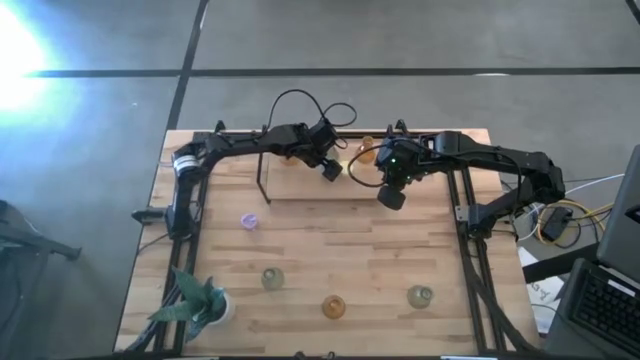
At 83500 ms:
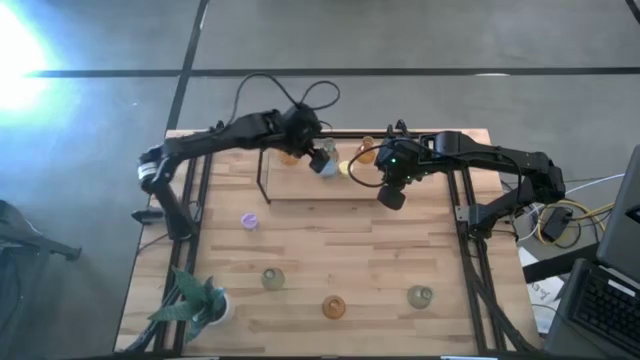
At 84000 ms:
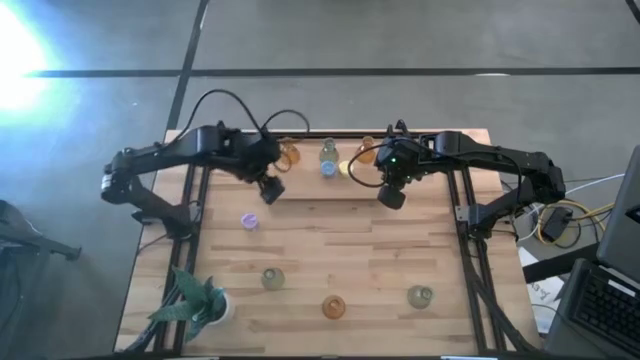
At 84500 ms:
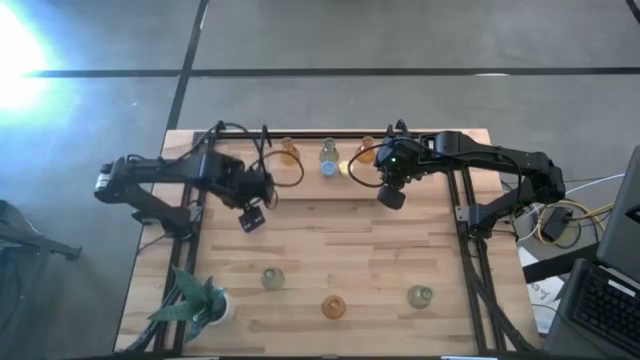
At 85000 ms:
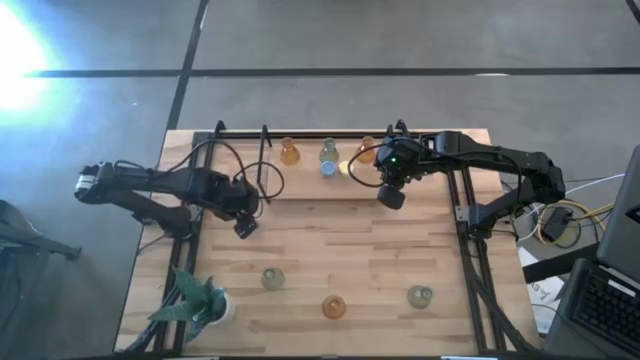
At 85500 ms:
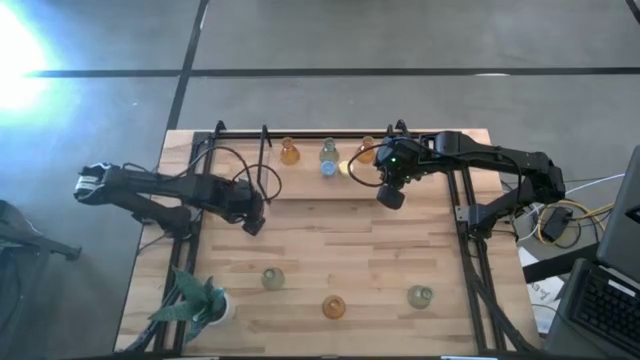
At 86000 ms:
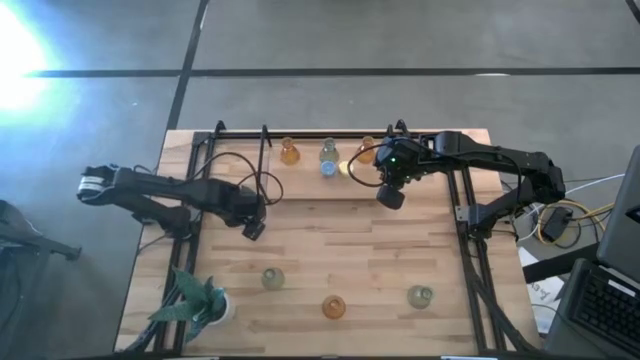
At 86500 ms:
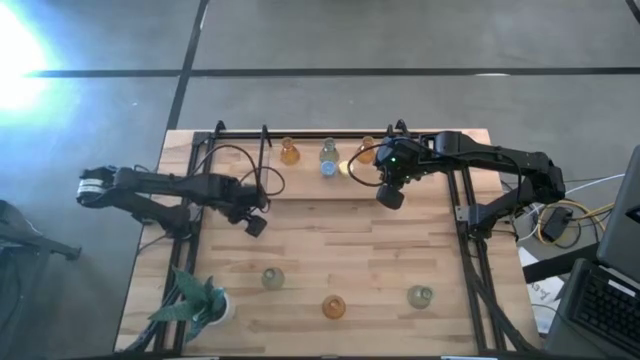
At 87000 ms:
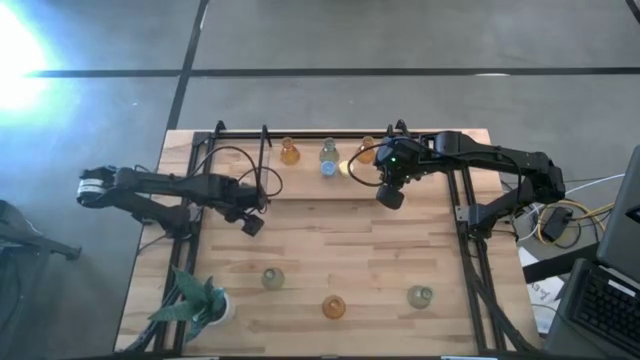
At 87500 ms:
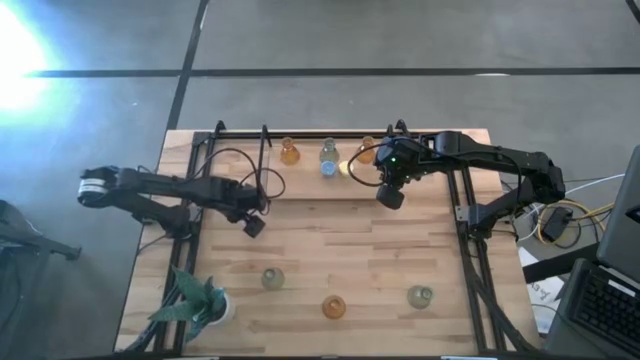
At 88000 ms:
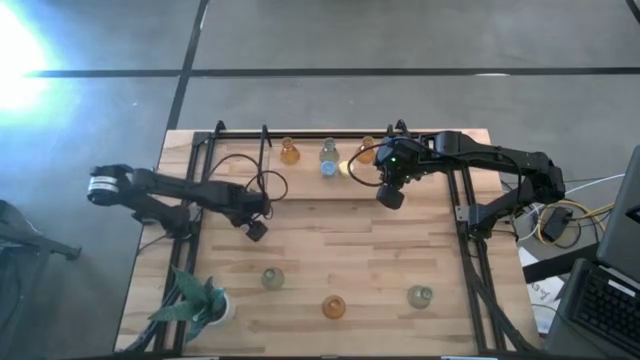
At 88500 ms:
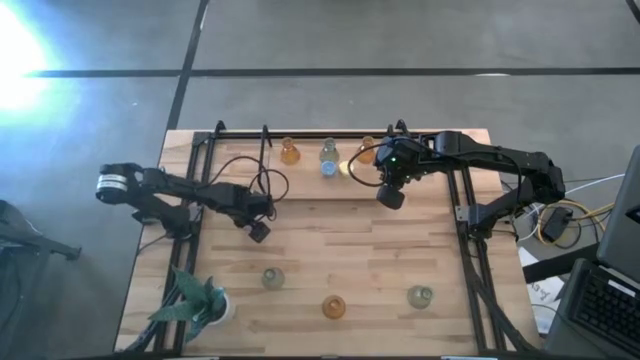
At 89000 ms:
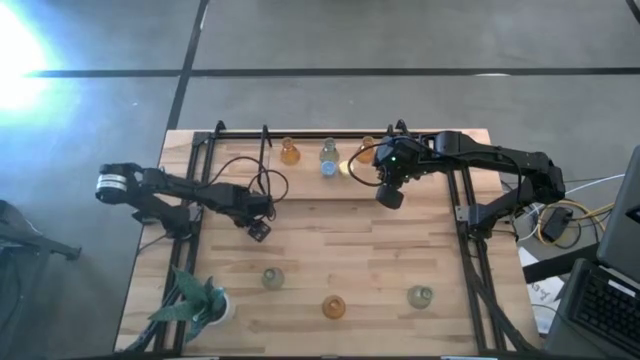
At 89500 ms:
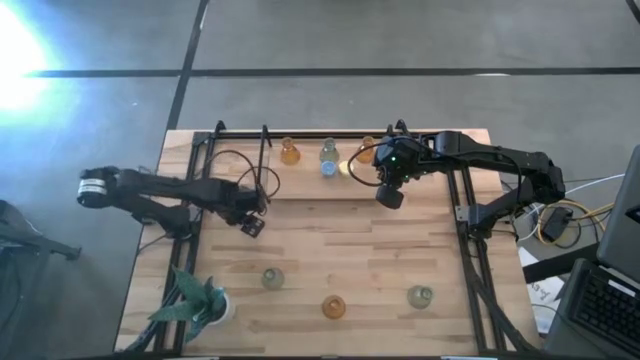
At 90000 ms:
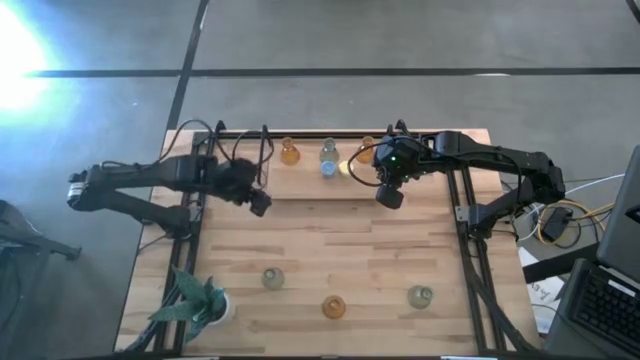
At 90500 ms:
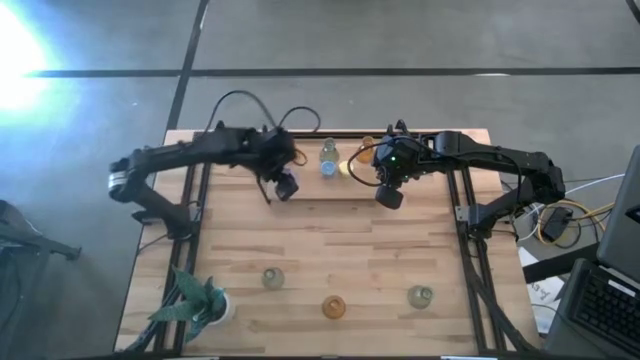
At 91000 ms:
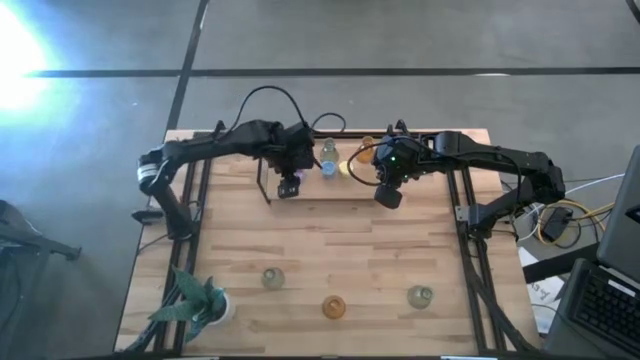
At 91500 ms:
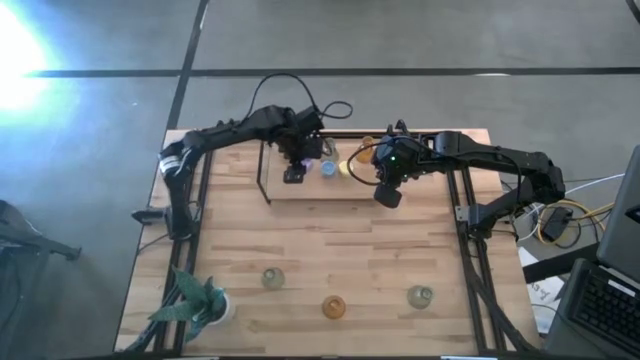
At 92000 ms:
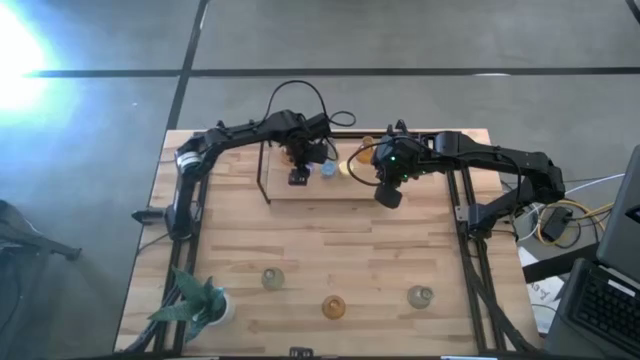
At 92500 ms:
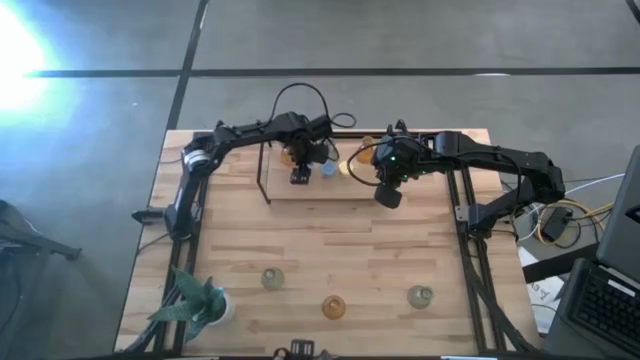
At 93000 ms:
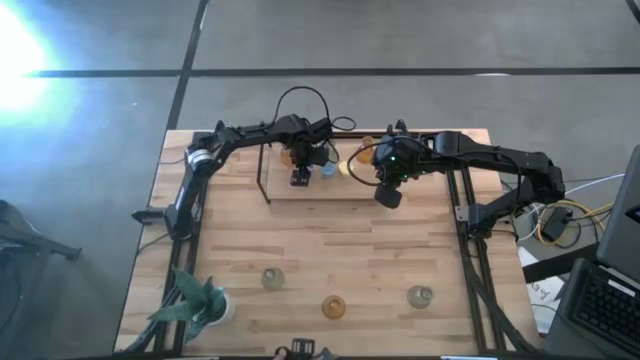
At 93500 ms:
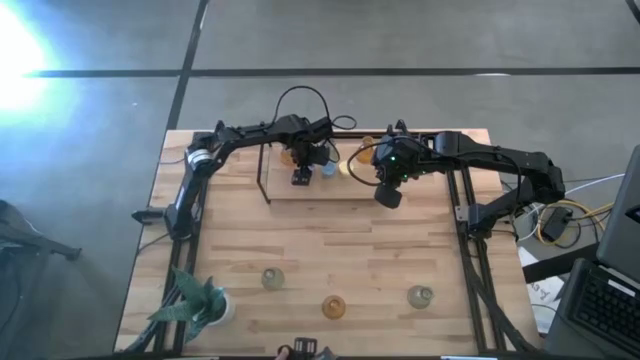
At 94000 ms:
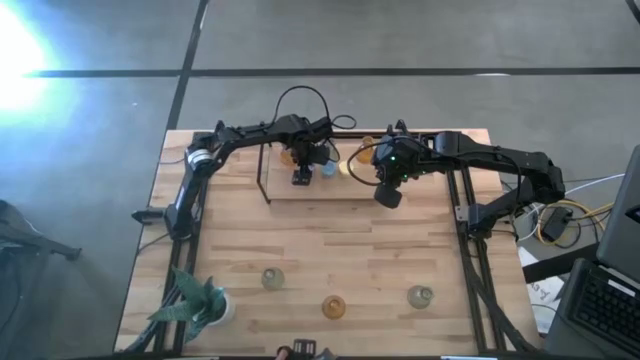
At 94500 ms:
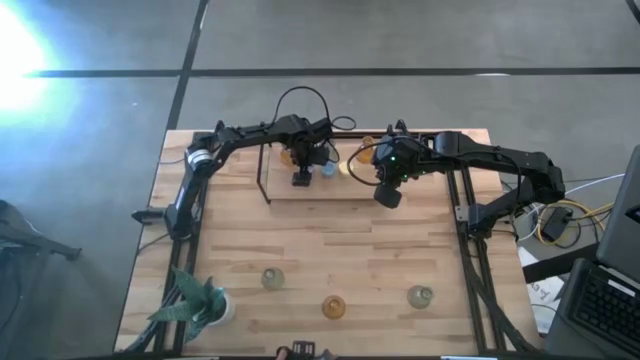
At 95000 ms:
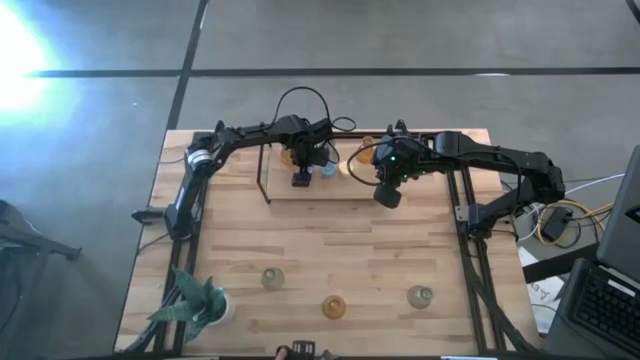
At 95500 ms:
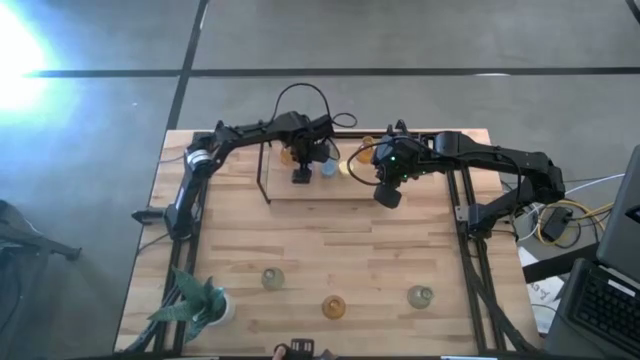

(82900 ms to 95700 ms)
Task: Pick & Place candle stick holders
Put the violet candle on the shelf

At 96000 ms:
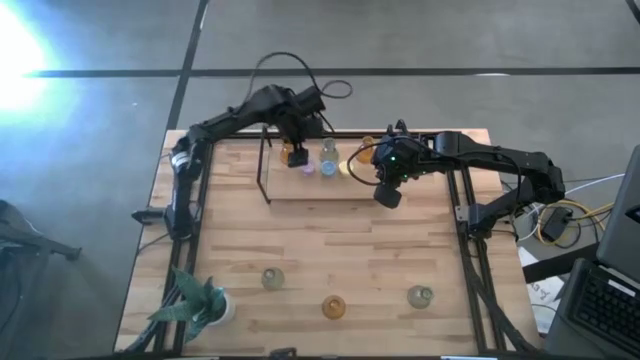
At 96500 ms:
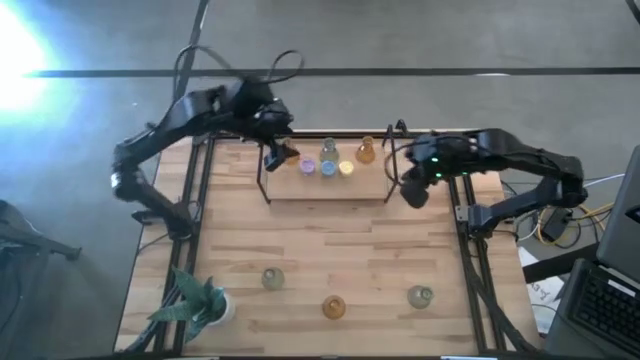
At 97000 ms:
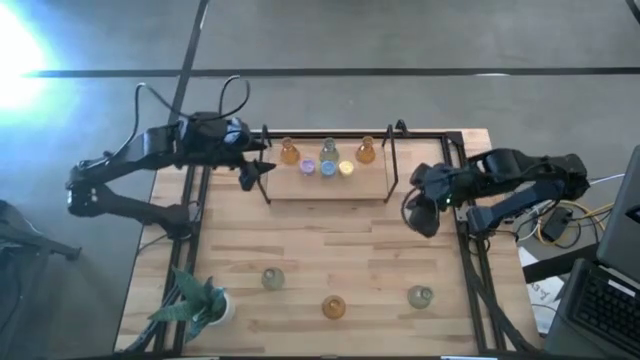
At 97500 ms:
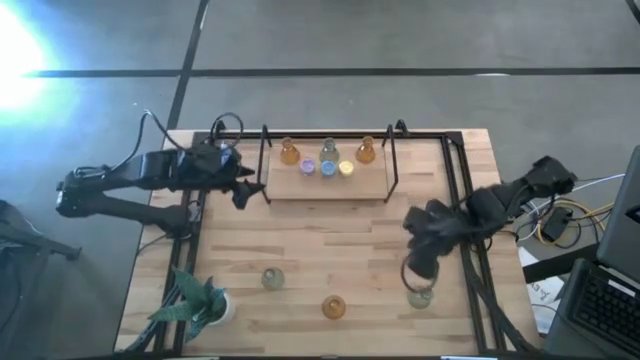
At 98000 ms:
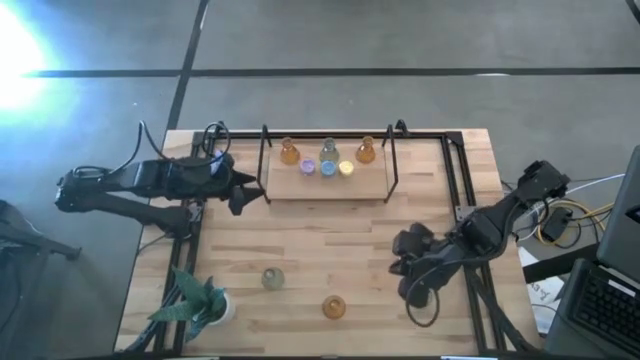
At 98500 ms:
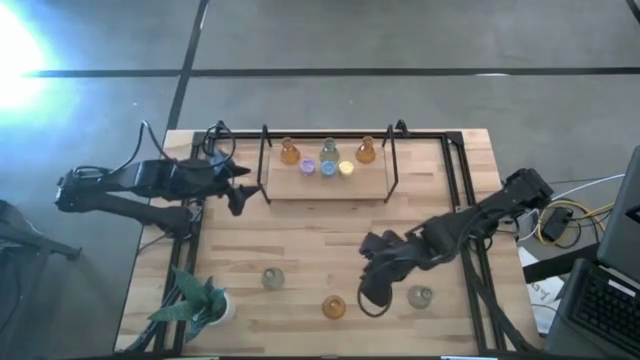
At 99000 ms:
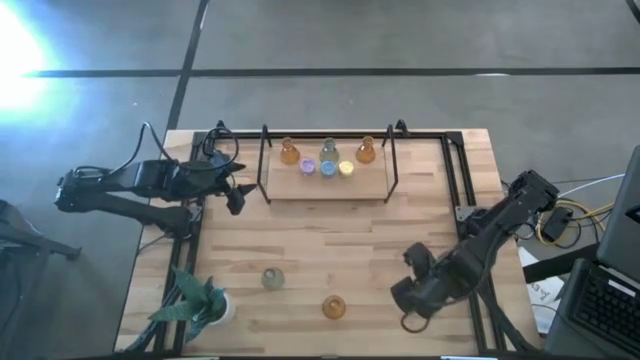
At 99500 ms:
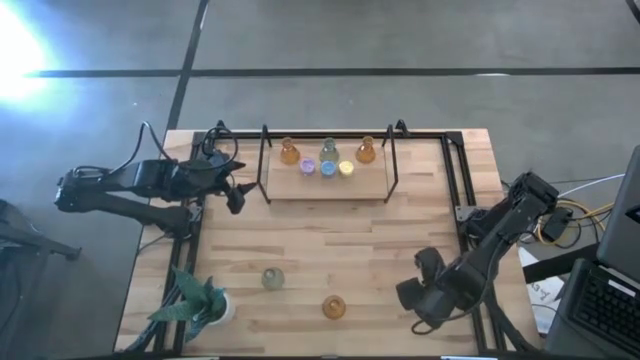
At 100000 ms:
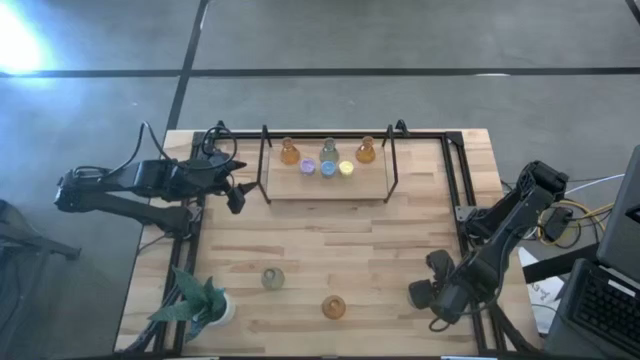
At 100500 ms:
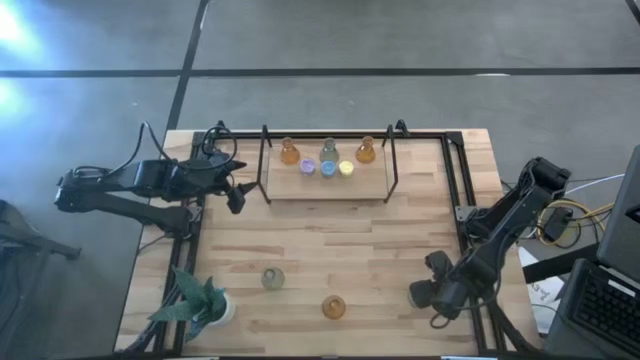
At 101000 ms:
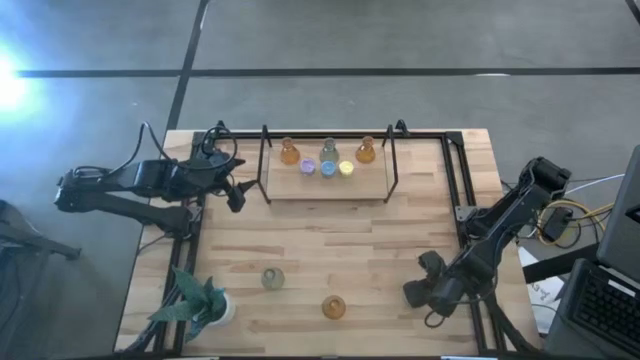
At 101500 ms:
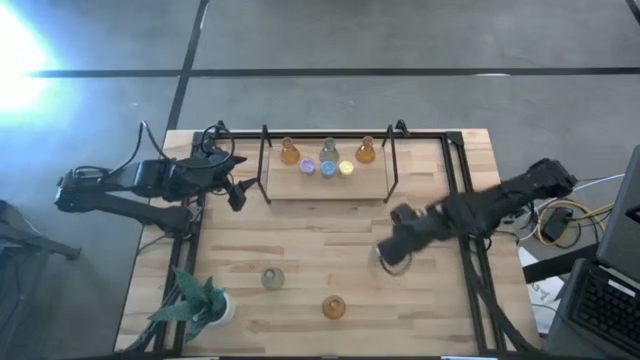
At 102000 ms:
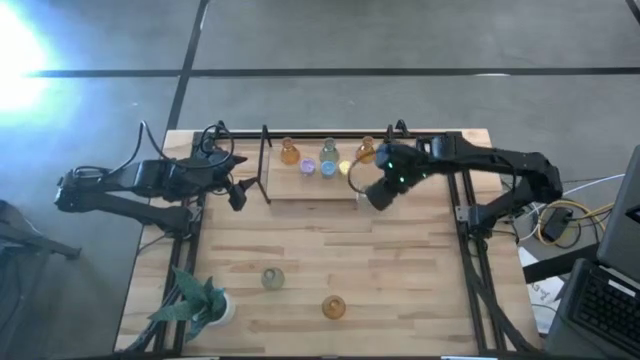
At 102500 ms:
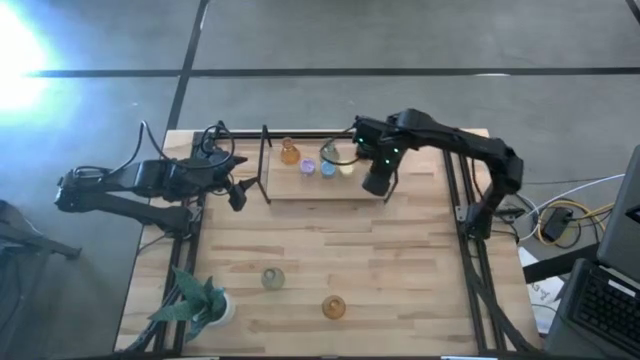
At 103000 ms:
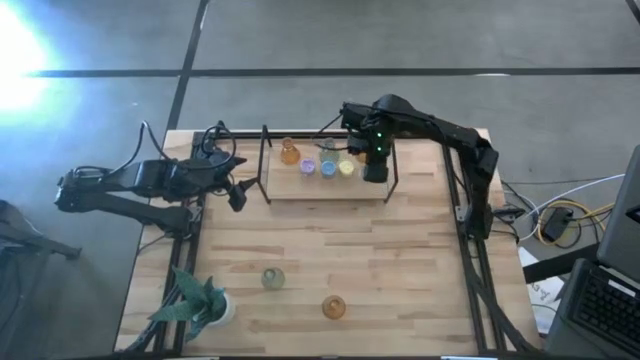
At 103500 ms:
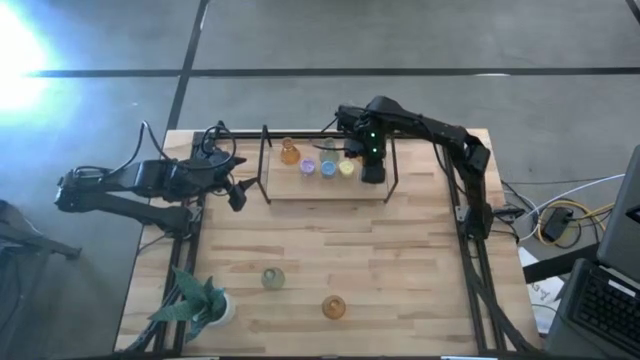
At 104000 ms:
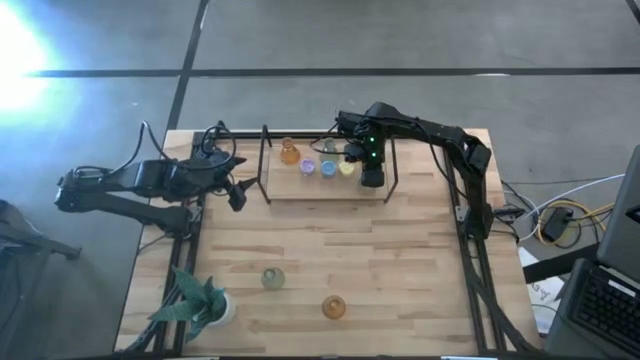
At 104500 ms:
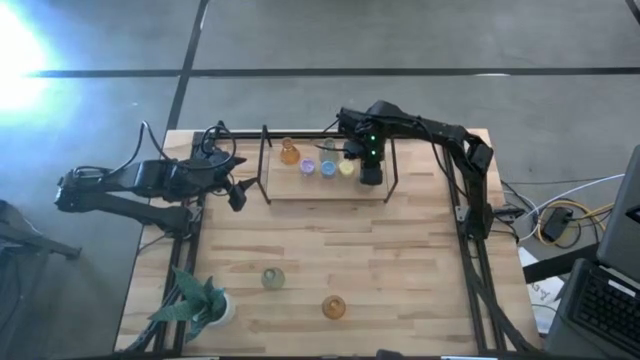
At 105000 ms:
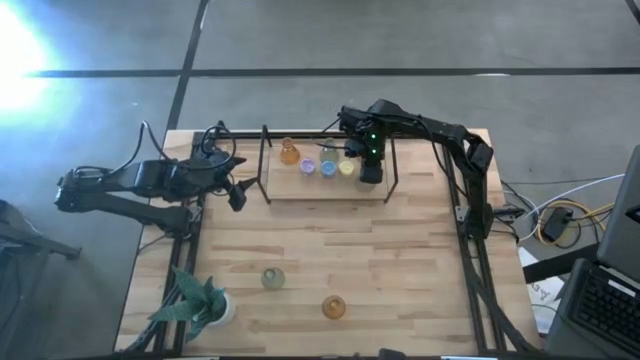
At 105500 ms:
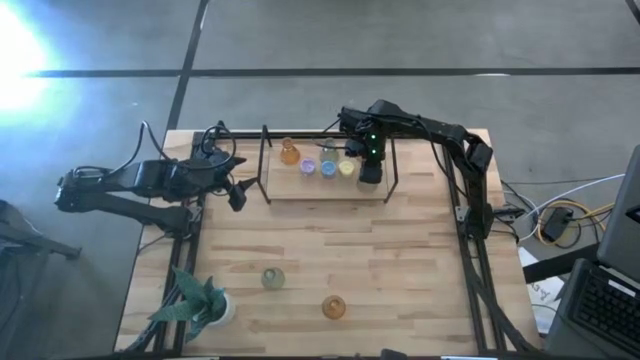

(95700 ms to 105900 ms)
Put the right green glass candle holder on the shelf
